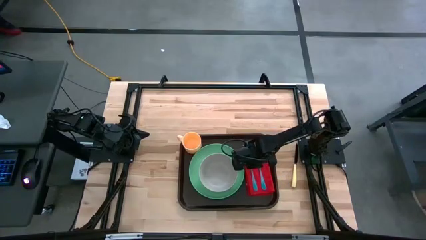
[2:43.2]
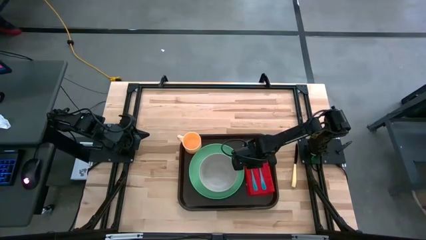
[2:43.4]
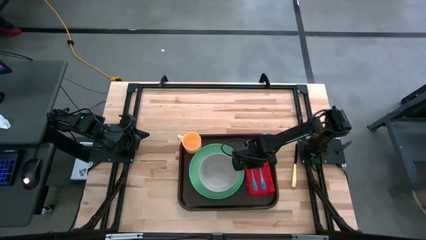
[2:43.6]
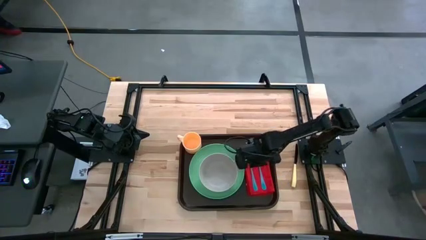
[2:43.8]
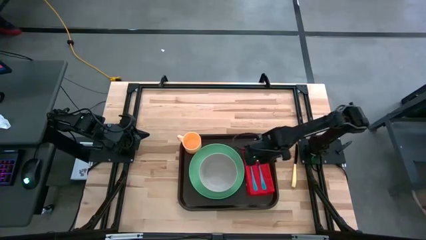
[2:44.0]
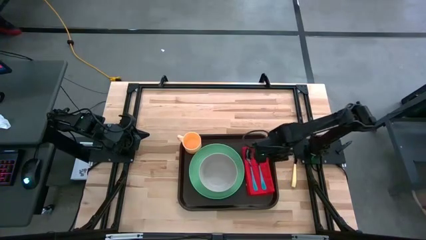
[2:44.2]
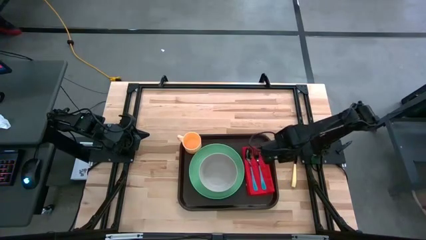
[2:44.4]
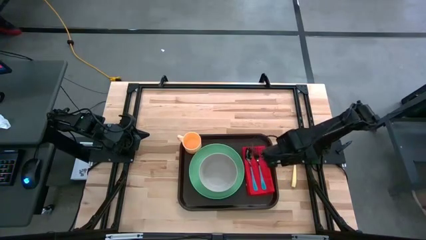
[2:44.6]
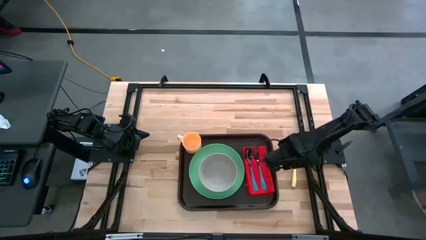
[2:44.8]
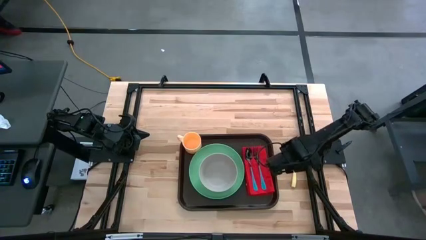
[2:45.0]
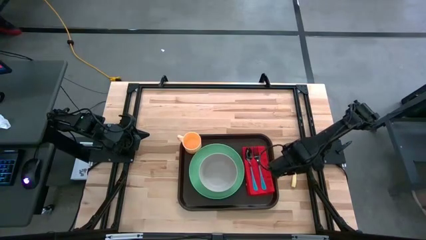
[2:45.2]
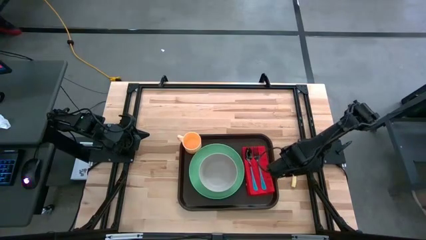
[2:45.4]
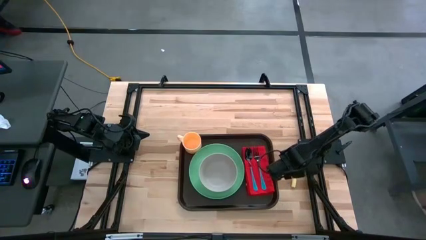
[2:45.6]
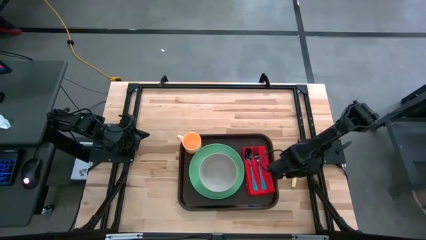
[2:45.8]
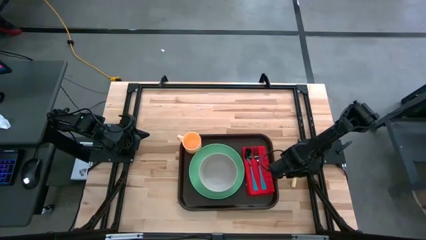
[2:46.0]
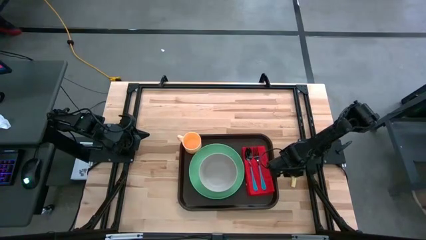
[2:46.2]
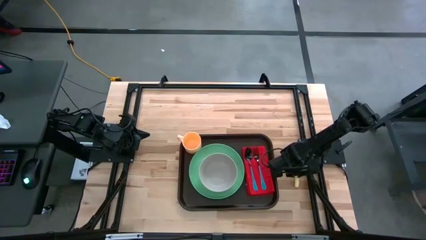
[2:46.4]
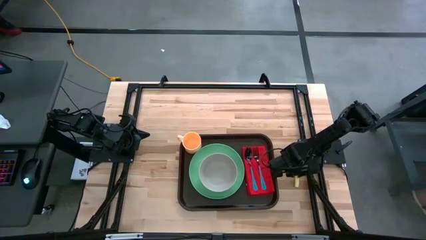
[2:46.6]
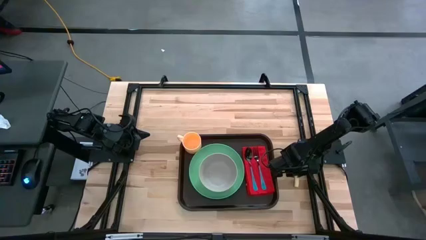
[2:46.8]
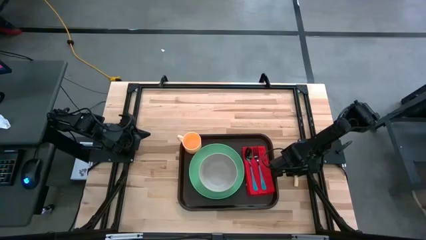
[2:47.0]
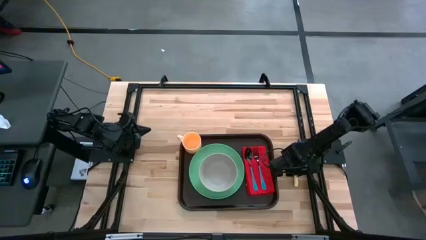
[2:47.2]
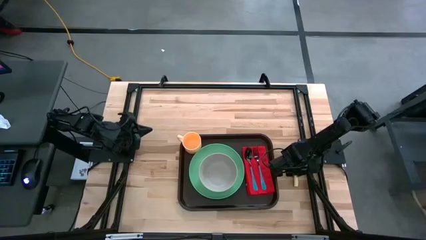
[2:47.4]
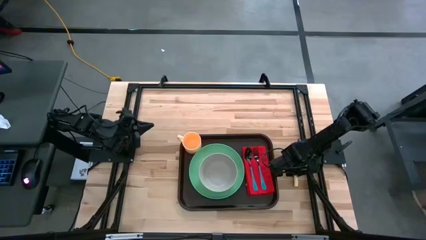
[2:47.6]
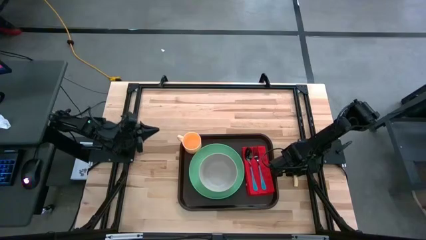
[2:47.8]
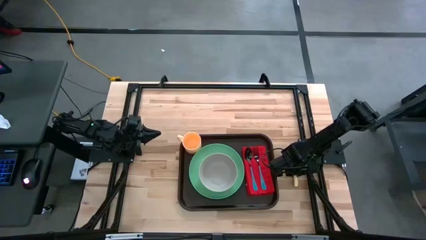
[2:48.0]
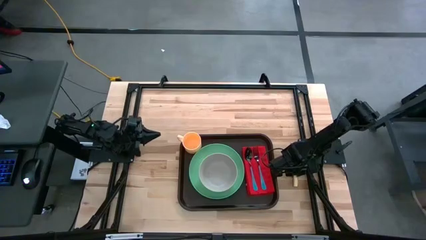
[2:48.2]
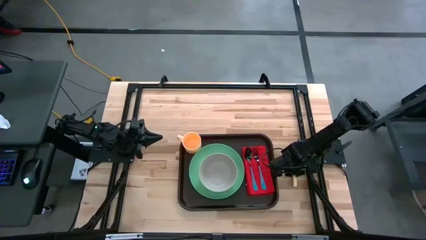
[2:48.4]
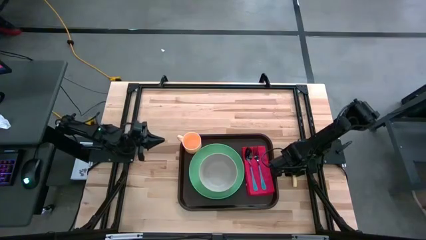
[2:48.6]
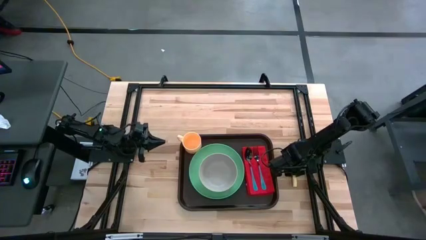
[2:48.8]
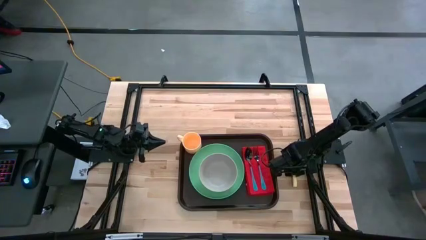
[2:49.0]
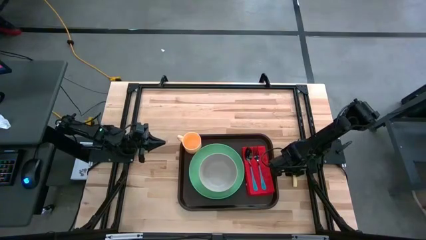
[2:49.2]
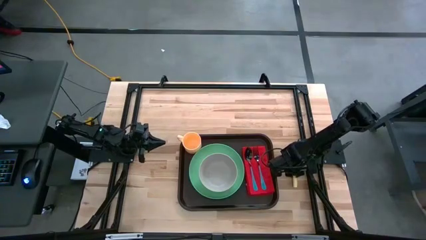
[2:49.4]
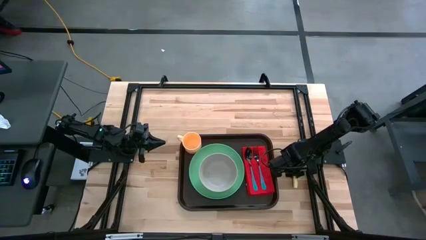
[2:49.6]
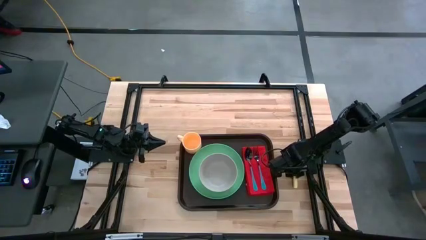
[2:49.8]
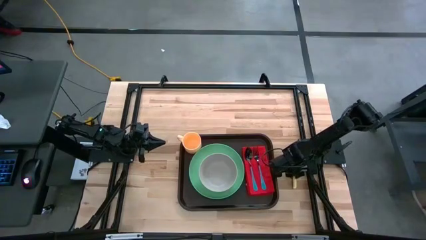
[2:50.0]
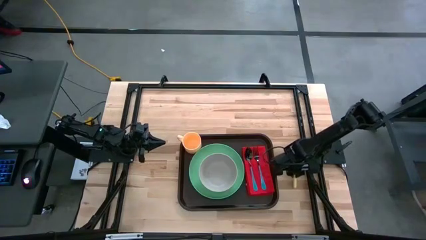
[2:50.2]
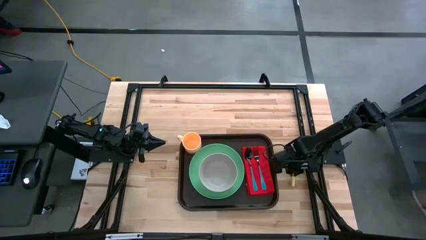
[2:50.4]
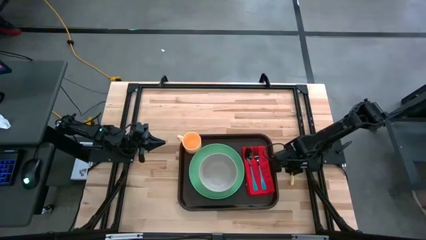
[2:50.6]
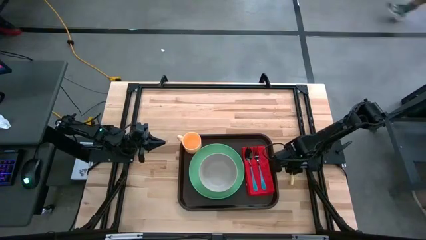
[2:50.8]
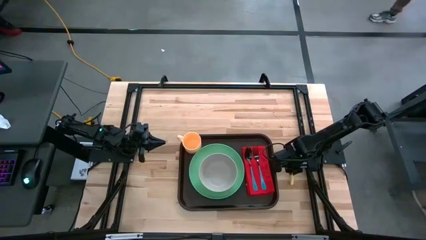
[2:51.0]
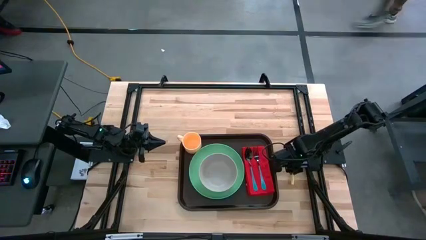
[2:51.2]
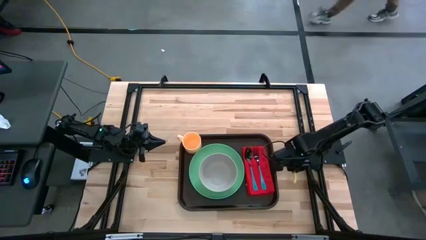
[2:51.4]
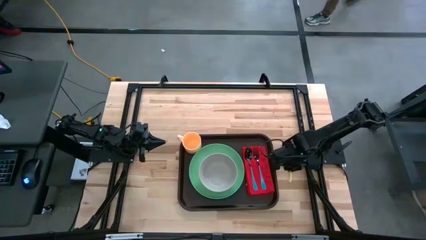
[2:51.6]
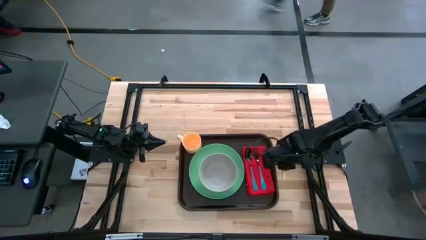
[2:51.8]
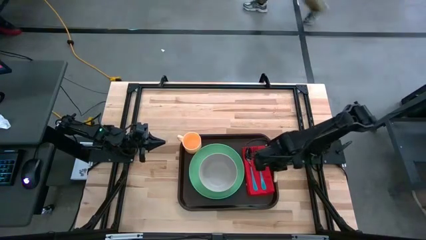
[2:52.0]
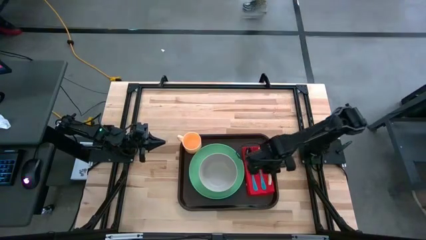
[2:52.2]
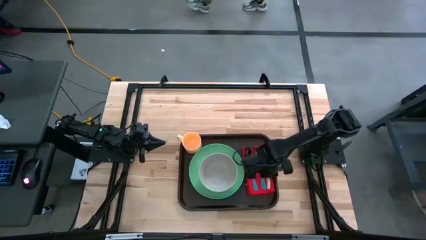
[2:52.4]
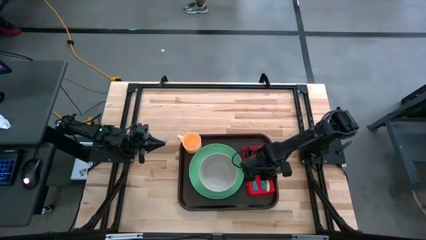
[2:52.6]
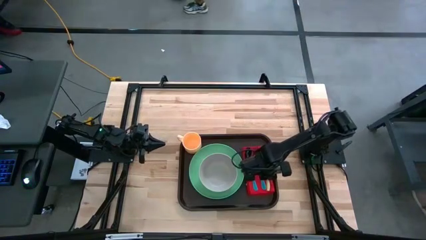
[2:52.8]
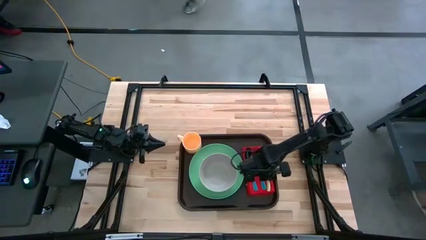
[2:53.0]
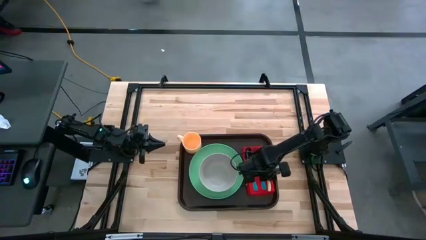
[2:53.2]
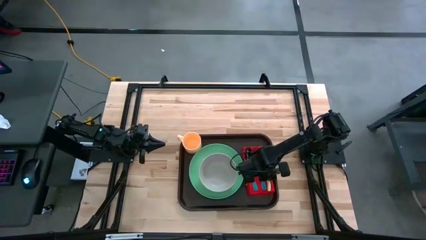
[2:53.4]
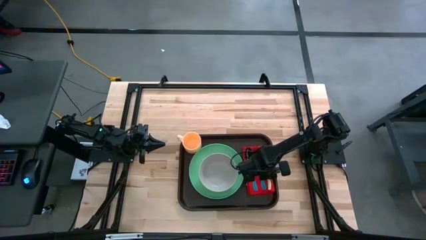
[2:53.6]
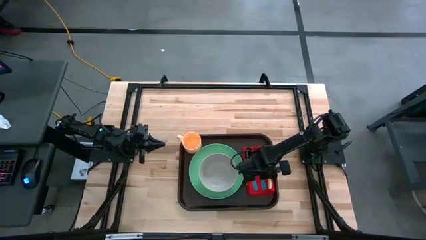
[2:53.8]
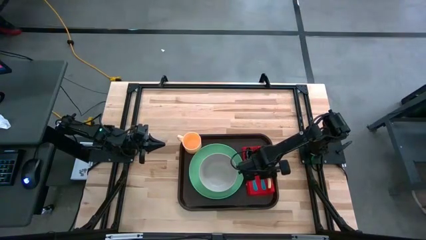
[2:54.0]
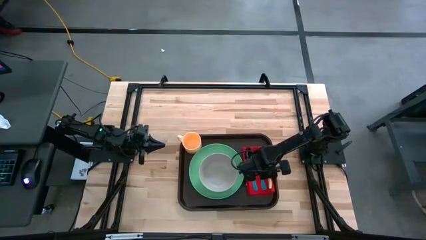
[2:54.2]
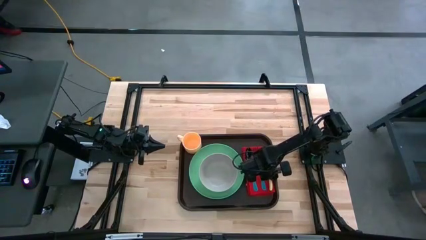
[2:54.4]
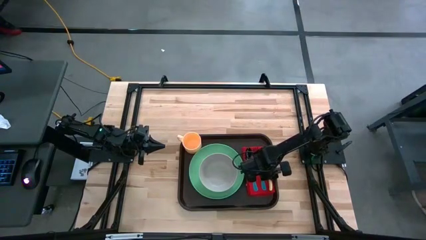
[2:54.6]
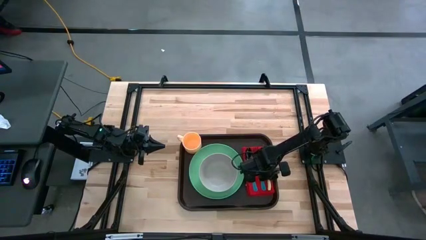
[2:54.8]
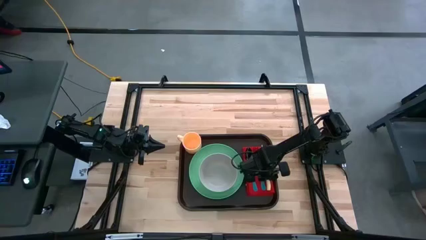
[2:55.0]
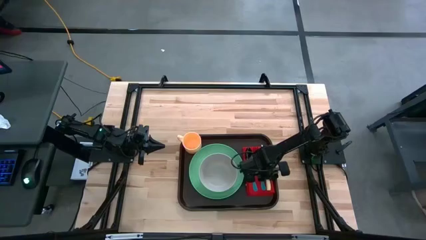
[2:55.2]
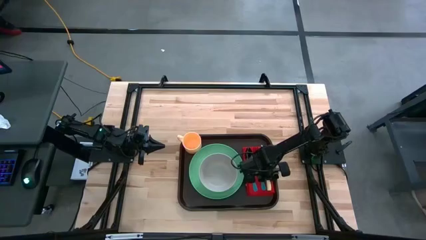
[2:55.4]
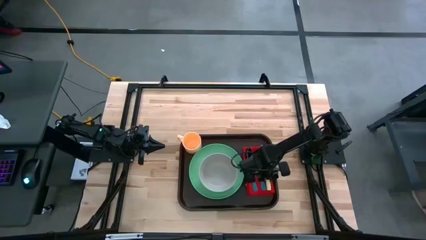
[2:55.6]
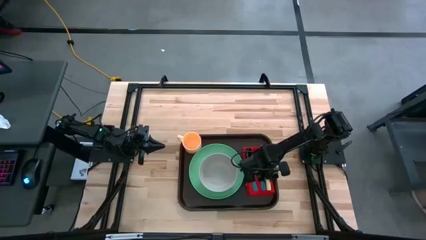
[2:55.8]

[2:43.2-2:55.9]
Task: Set up tray
Put the yellow table knife to the right side of the blue fork on top of the red table napkin on the brown serving tray
